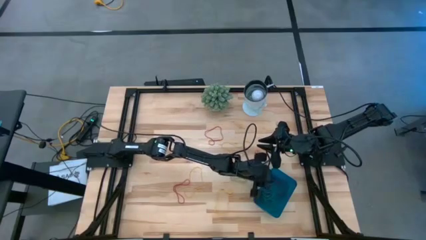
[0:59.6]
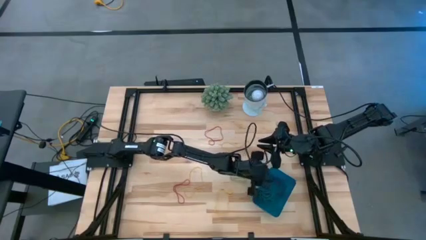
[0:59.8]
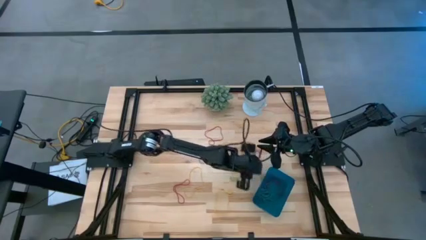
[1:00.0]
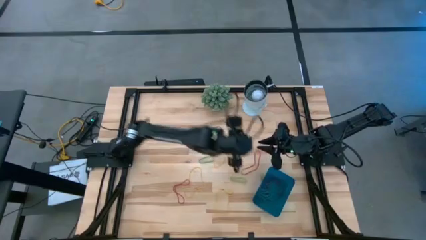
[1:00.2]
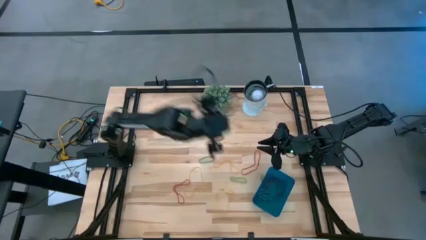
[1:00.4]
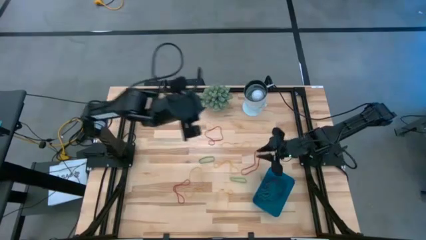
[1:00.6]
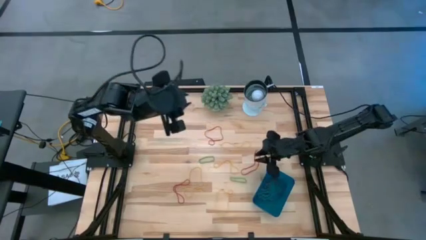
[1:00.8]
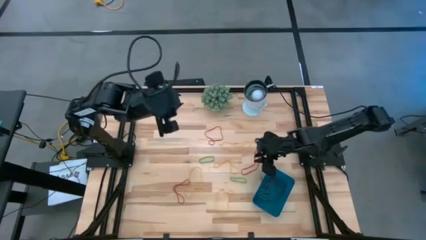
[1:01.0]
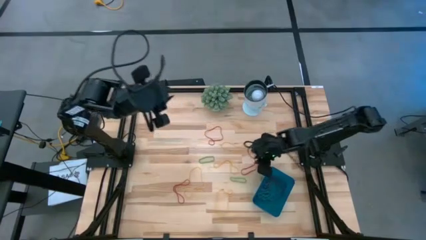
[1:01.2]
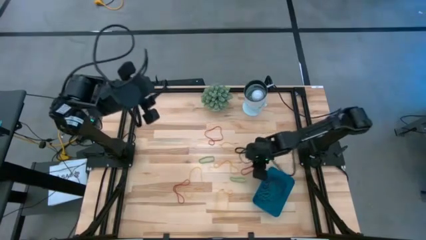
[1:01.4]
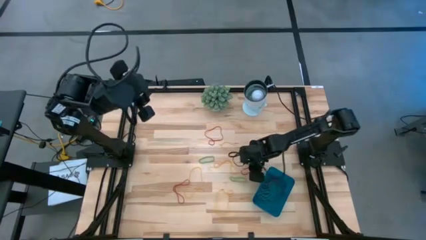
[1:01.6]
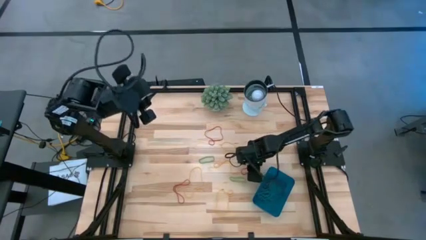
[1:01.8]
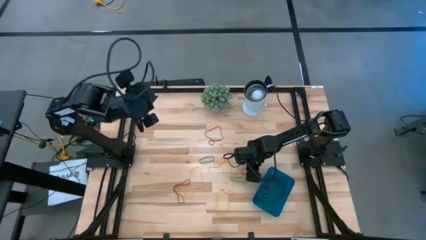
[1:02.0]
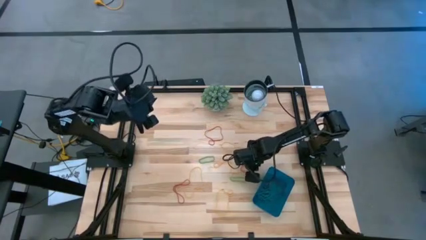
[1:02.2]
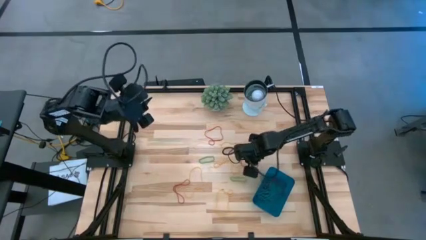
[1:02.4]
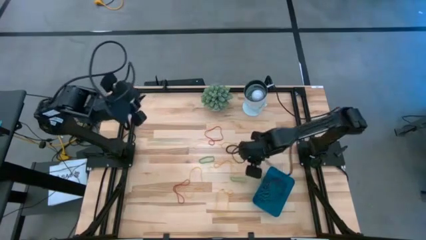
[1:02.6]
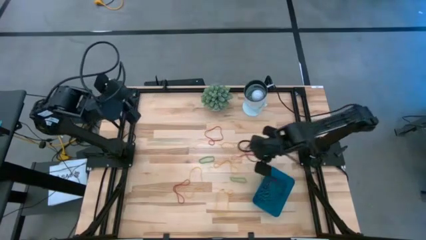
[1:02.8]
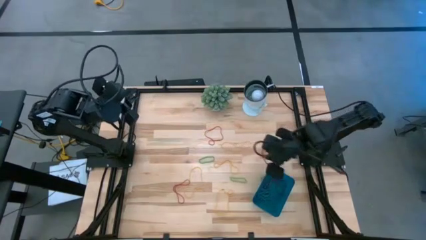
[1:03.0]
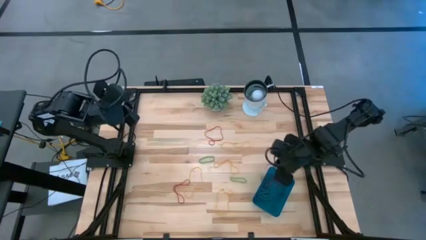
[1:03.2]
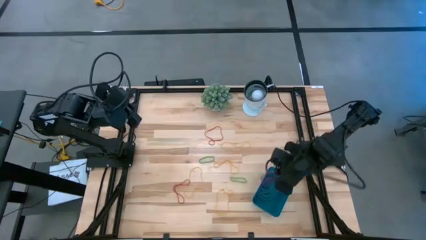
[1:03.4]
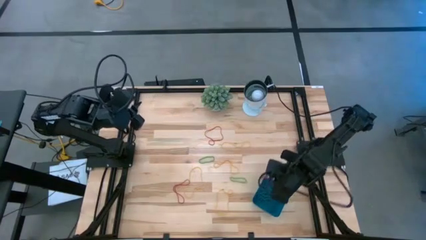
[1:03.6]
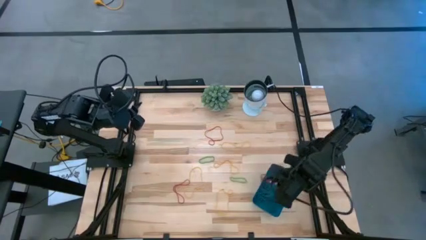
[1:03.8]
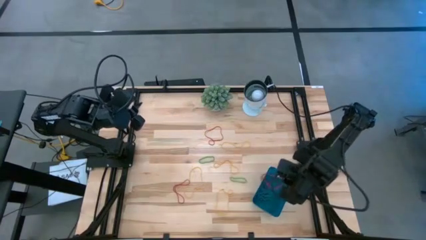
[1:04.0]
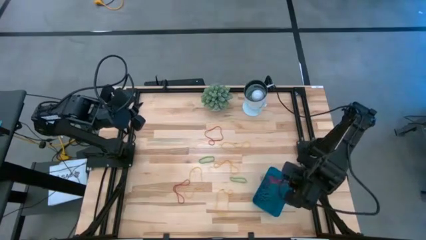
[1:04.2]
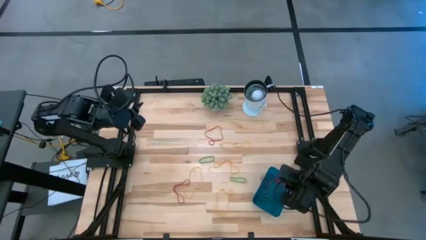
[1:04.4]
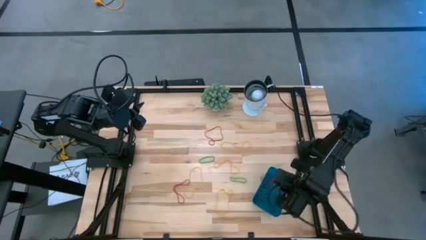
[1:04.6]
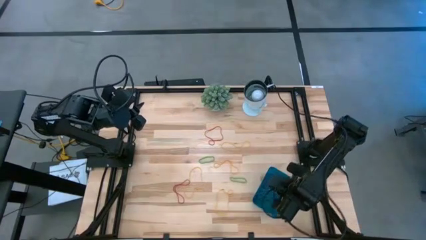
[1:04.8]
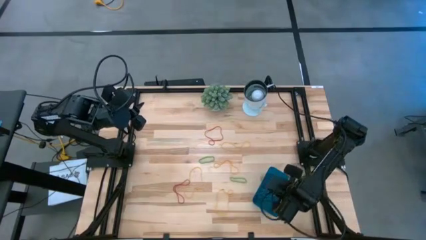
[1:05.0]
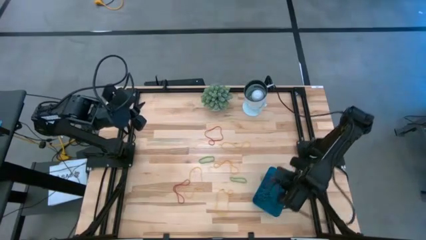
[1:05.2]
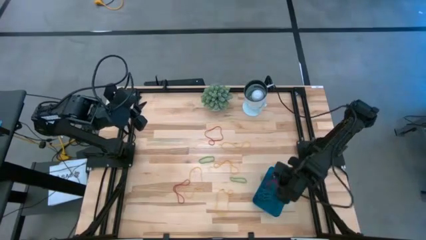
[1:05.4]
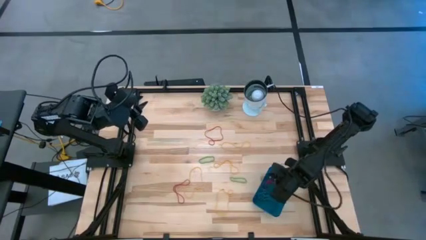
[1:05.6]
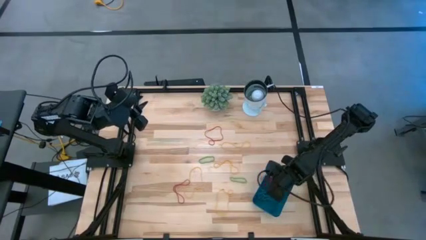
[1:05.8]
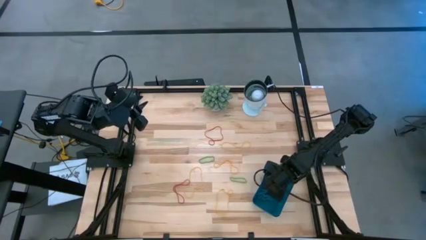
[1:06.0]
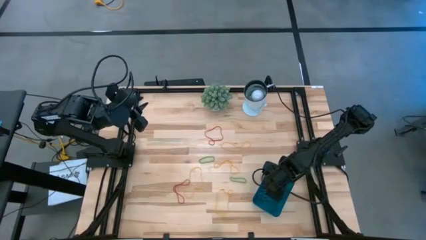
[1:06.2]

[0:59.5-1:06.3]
Task: Pick and place items into bin
Put the red rubber band into the blue bin

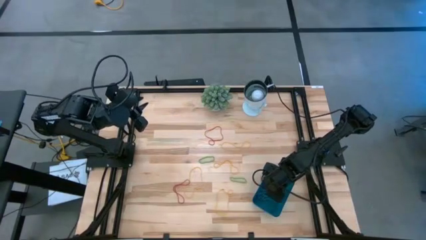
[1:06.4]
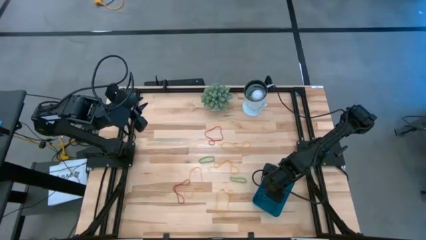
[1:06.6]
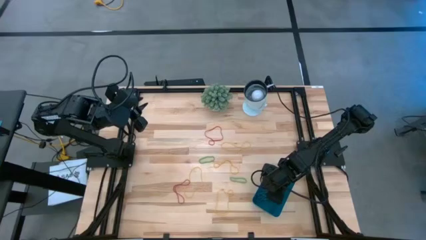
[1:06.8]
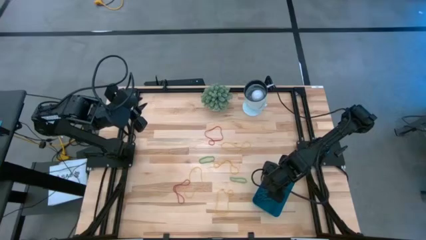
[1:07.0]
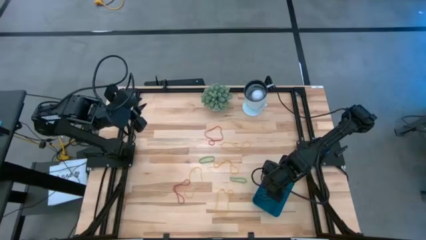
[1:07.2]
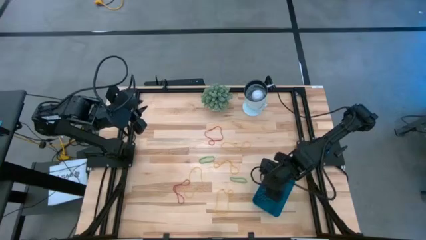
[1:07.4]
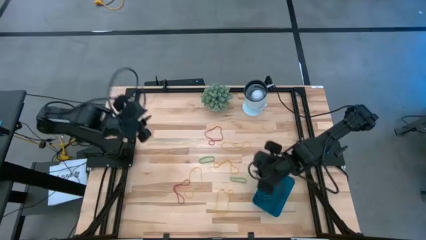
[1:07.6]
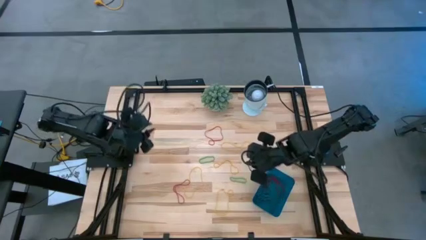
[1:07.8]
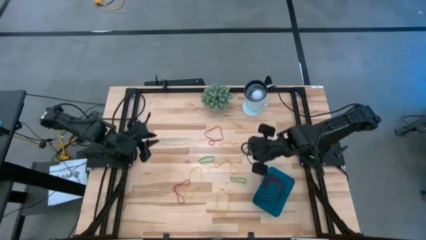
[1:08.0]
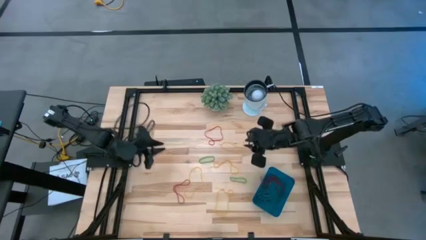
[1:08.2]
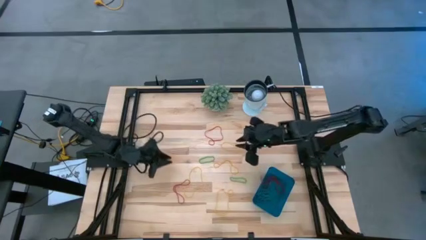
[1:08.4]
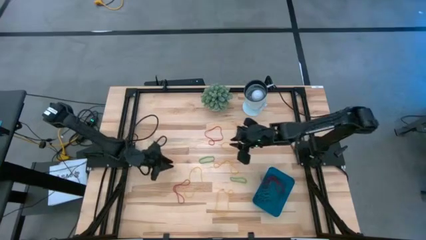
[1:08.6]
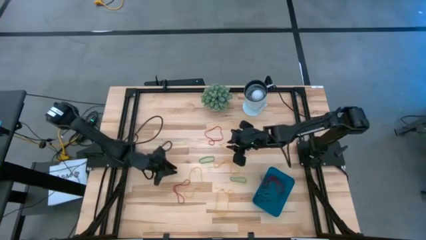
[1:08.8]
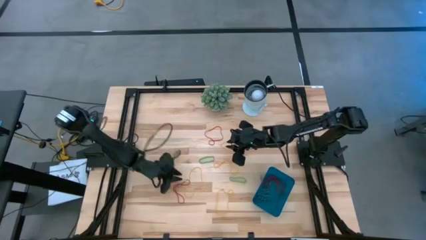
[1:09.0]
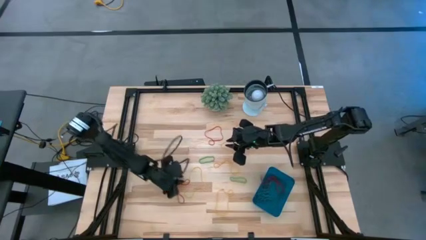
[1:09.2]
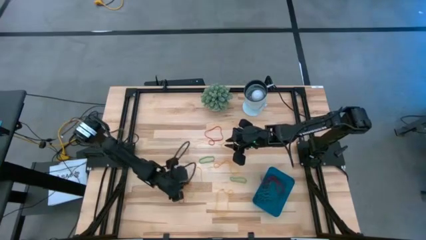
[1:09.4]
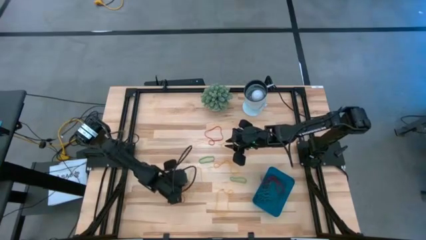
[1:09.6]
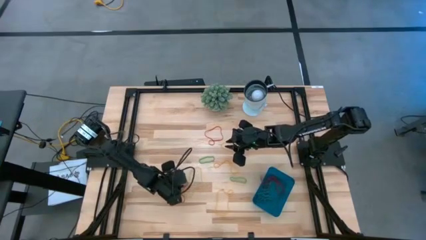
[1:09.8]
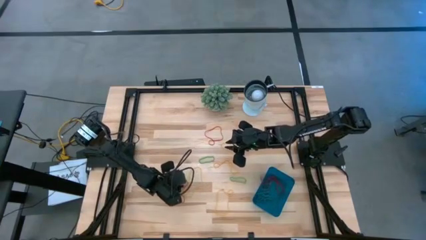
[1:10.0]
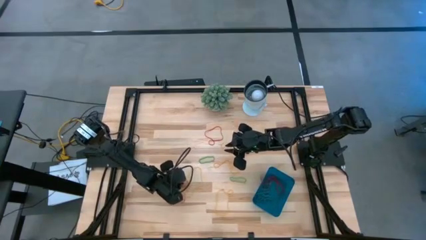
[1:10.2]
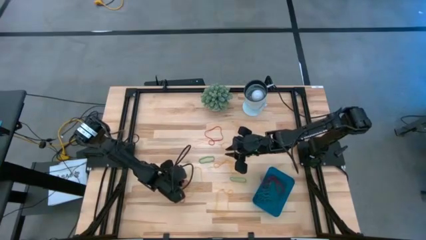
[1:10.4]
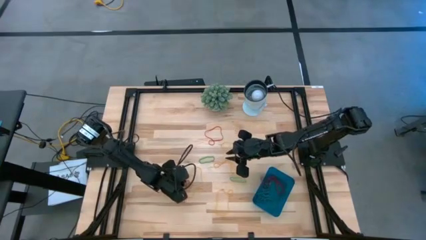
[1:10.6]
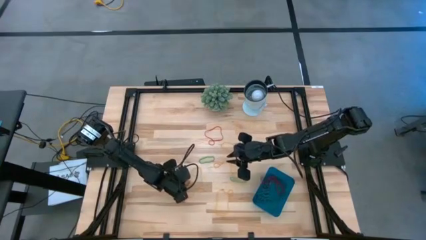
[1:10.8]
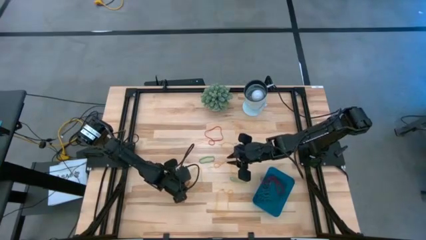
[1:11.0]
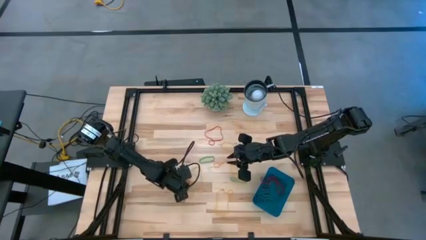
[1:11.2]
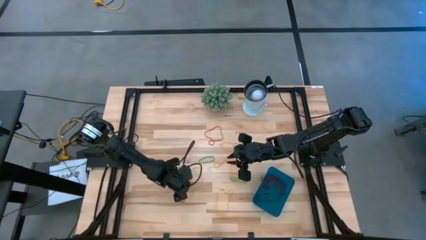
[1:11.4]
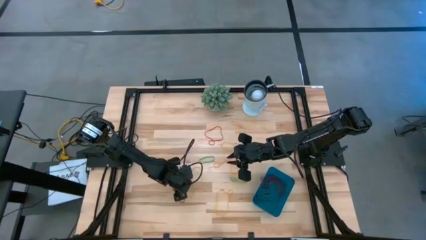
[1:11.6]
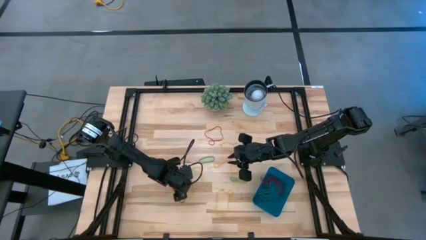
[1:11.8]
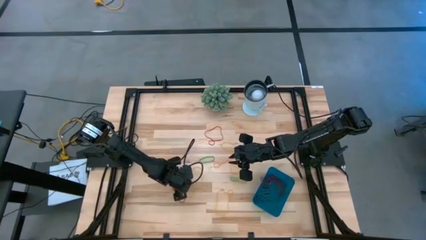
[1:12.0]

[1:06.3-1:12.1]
Put the red rubber band into the blue bin

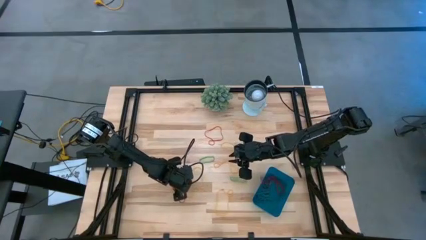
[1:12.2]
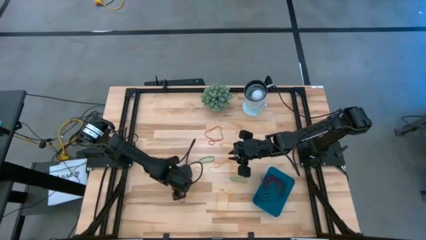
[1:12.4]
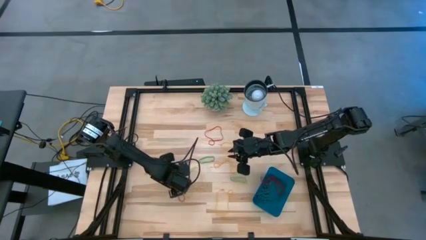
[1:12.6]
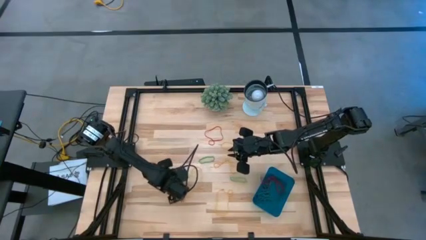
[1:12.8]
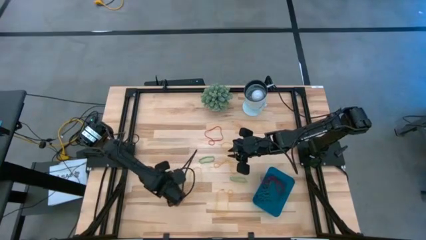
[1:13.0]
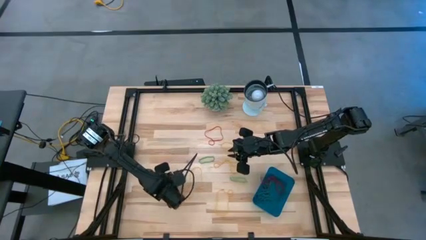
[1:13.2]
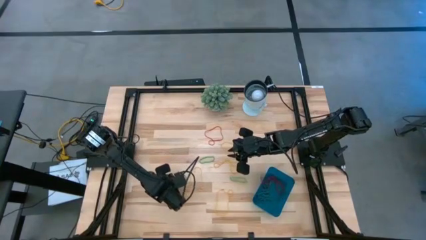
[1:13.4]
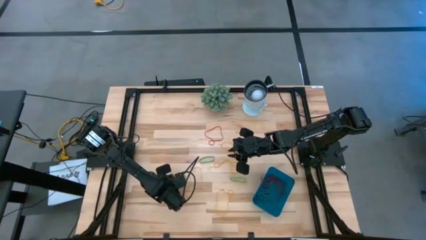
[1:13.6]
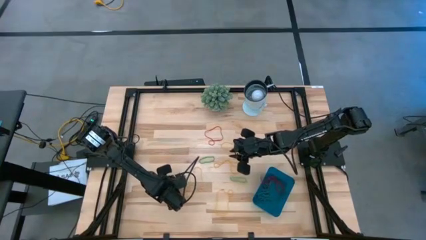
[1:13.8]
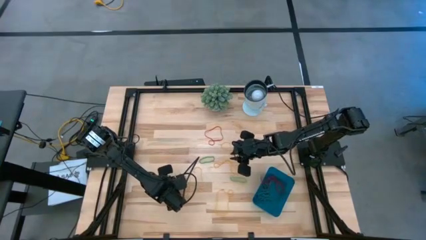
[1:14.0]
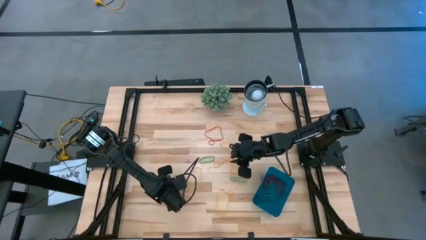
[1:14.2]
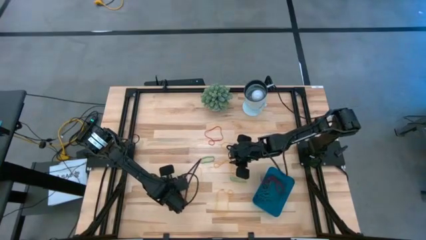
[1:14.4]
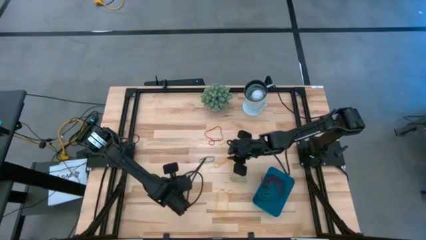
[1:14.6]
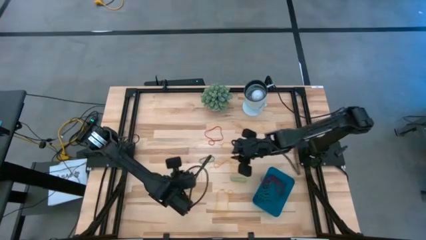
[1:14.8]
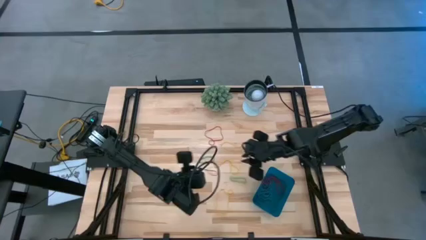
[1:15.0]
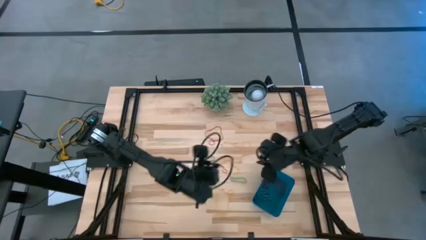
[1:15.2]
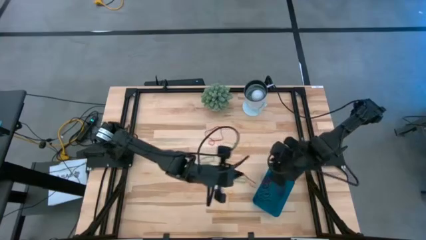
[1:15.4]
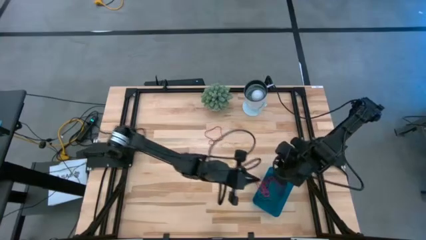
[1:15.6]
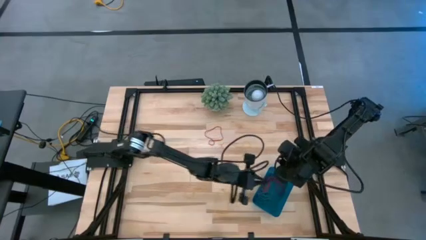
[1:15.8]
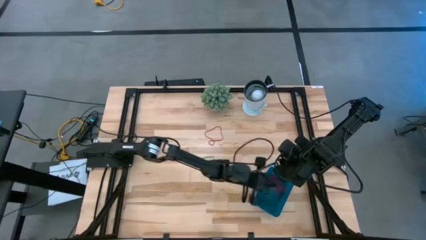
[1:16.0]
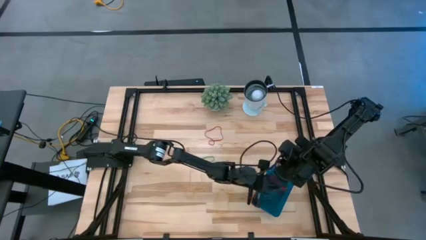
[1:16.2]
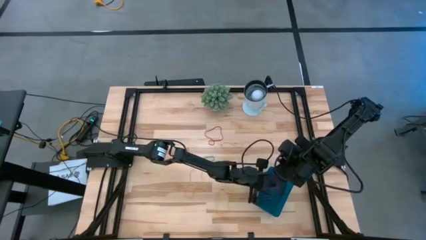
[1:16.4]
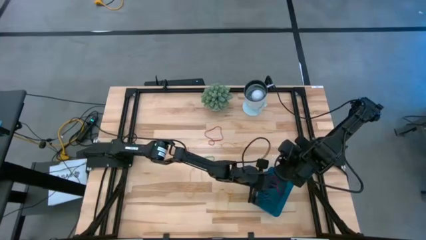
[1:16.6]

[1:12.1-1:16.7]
Put the red rubber band into the blue bin
